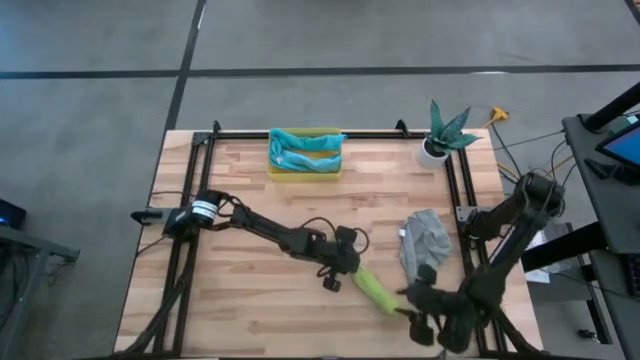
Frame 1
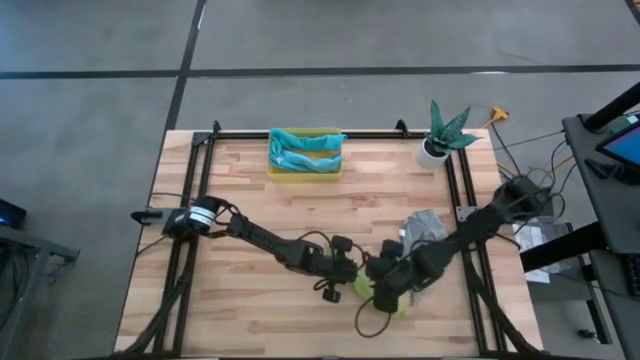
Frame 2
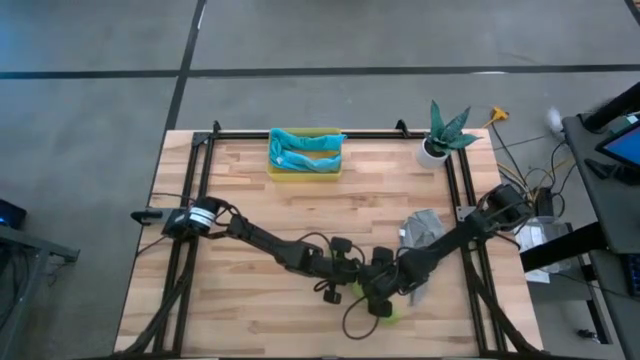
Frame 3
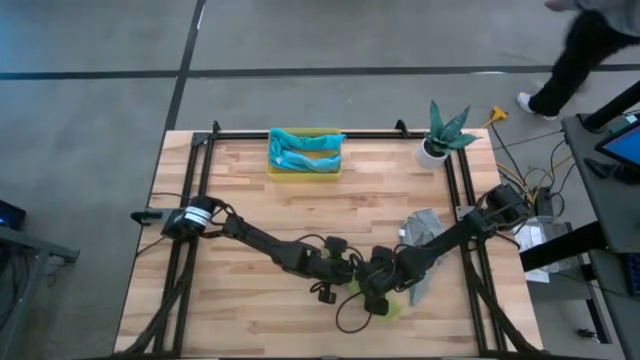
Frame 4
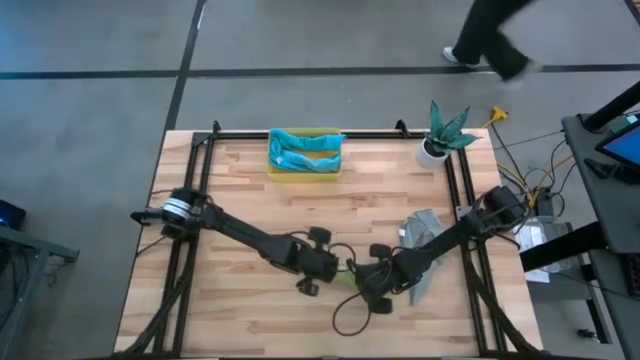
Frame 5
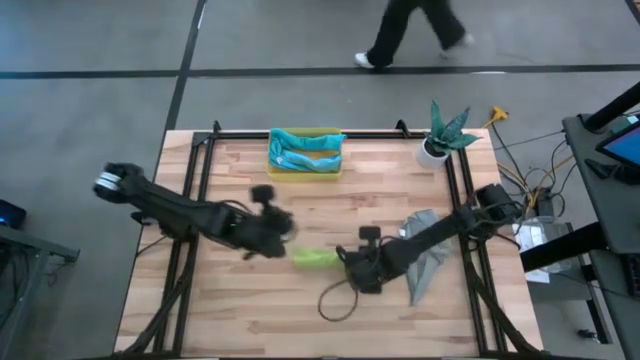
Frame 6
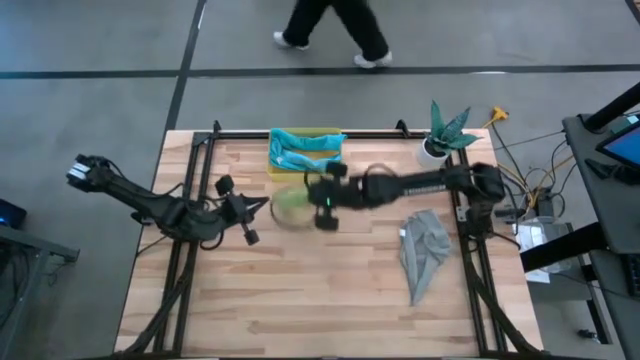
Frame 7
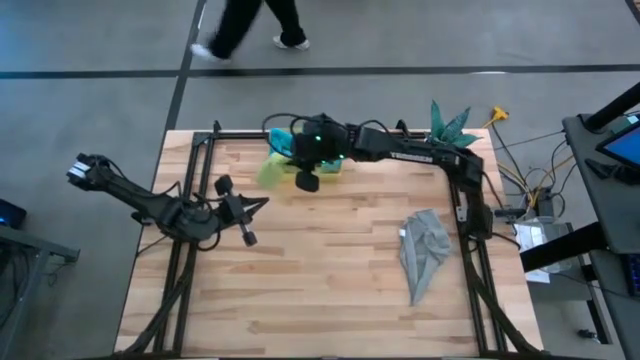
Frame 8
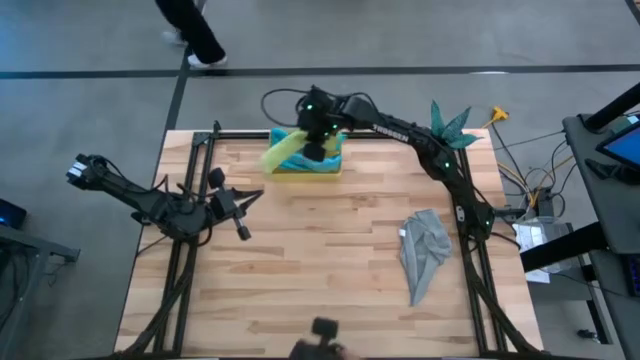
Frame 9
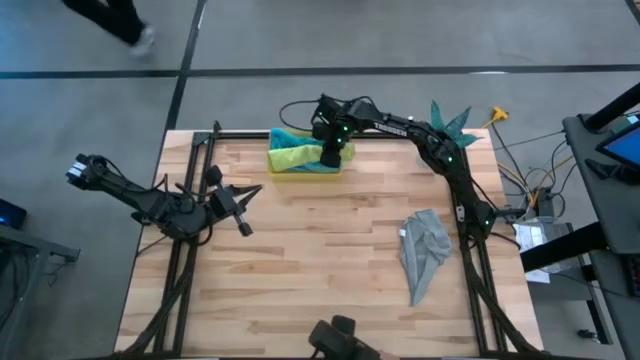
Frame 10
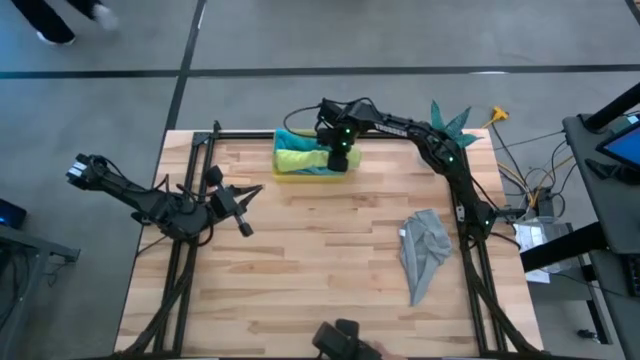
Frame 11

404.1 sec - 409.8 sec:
Task: Roll microfiber towels into tight, uniform cylinder then place into a basket
Put the rolled green towel into the yellow bin

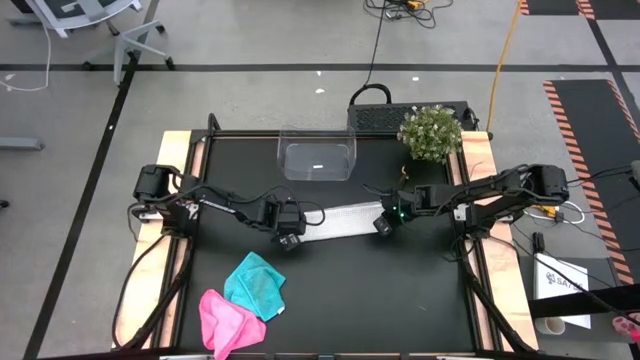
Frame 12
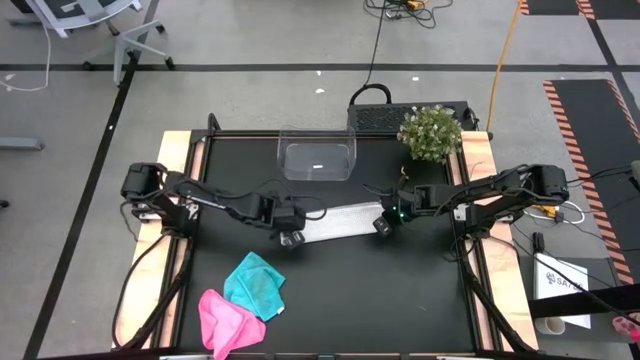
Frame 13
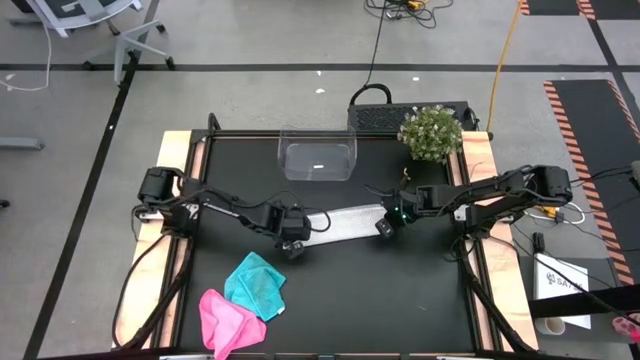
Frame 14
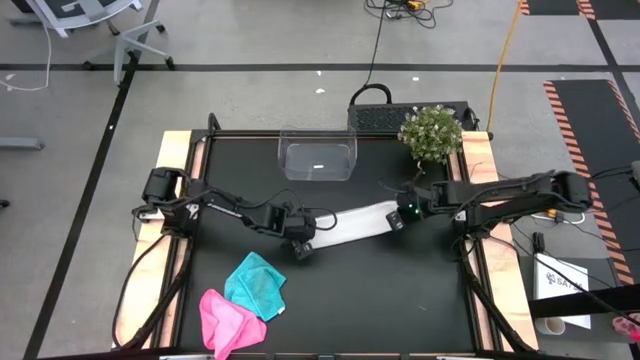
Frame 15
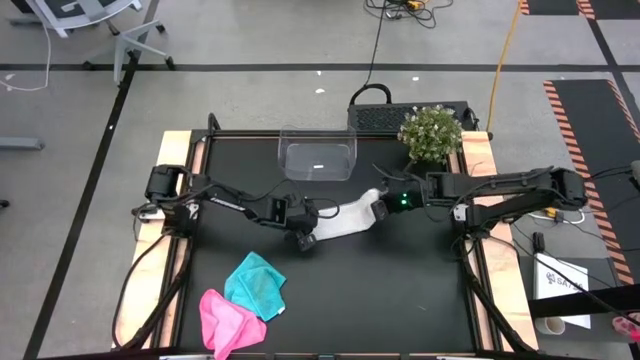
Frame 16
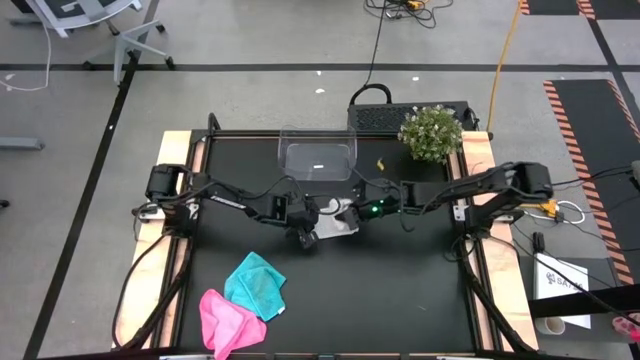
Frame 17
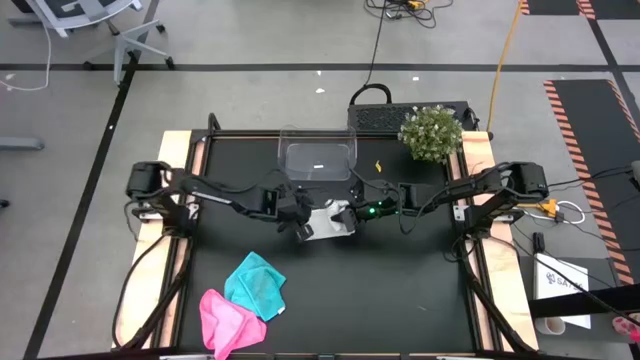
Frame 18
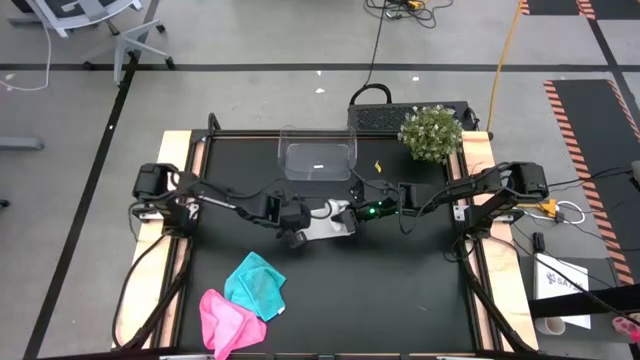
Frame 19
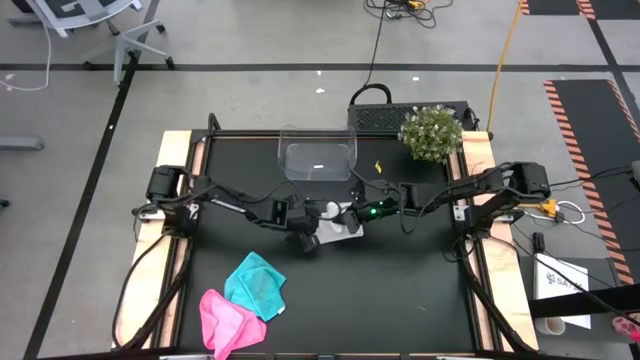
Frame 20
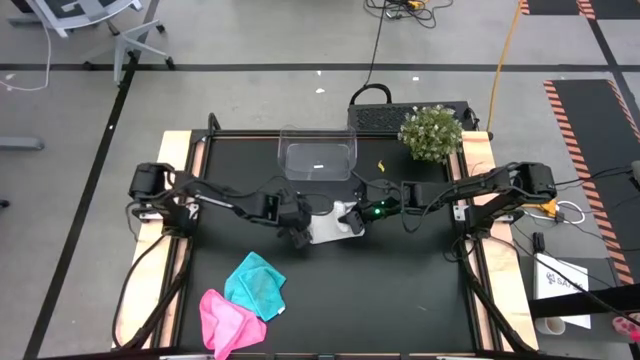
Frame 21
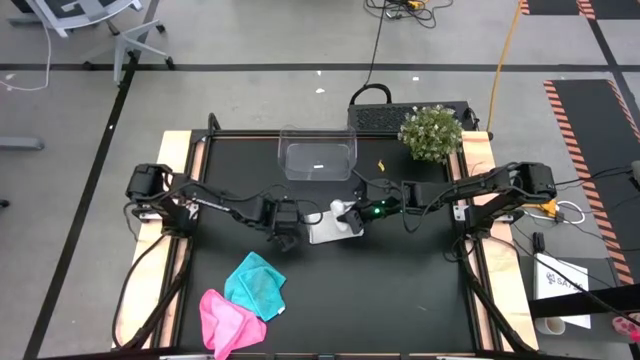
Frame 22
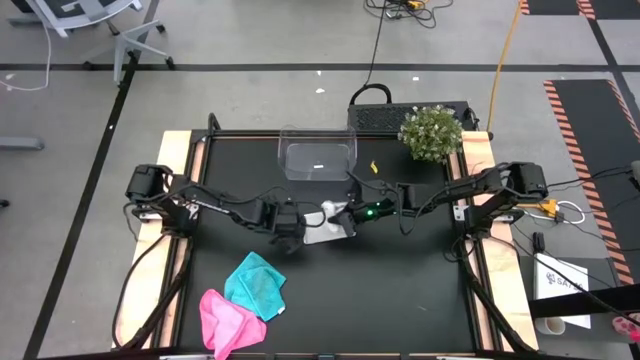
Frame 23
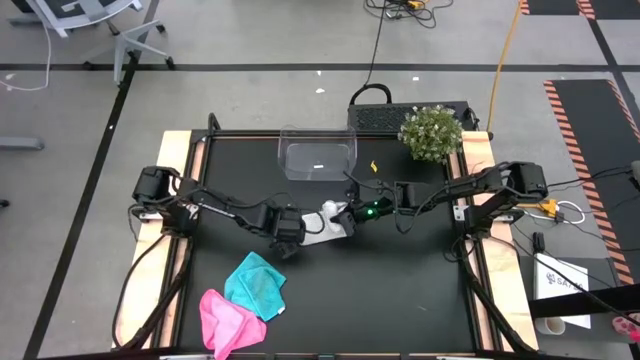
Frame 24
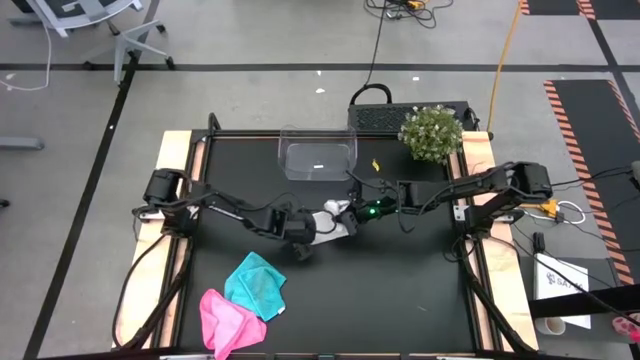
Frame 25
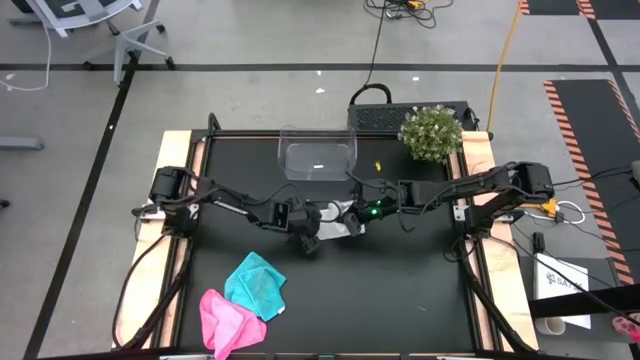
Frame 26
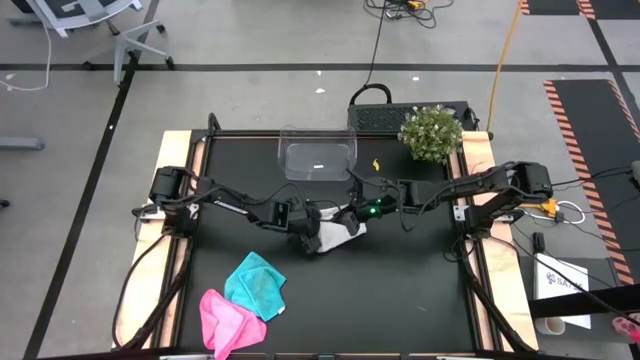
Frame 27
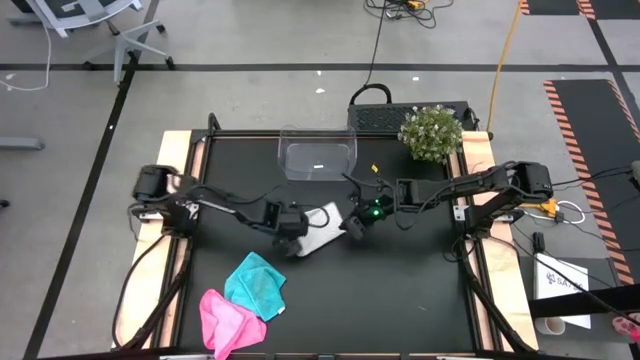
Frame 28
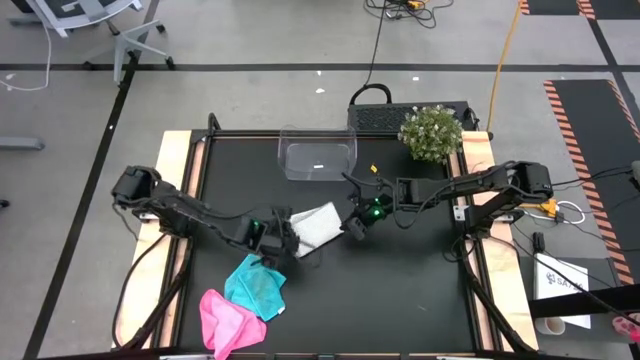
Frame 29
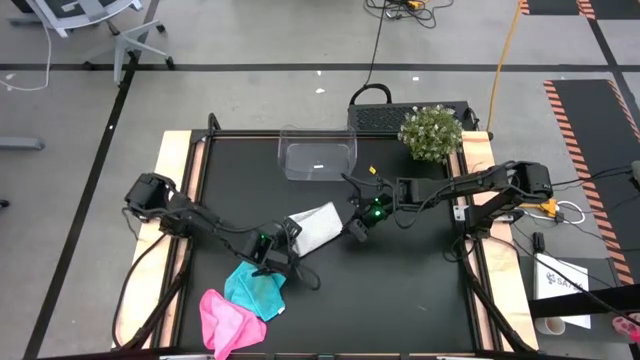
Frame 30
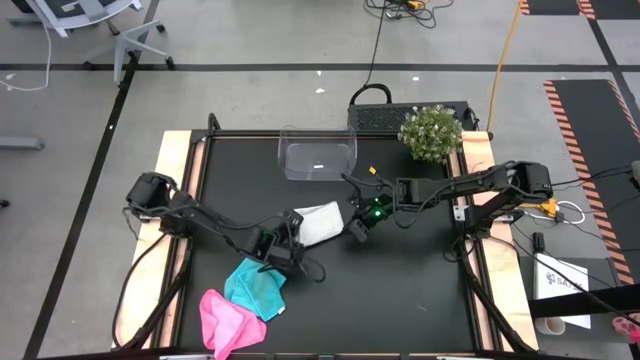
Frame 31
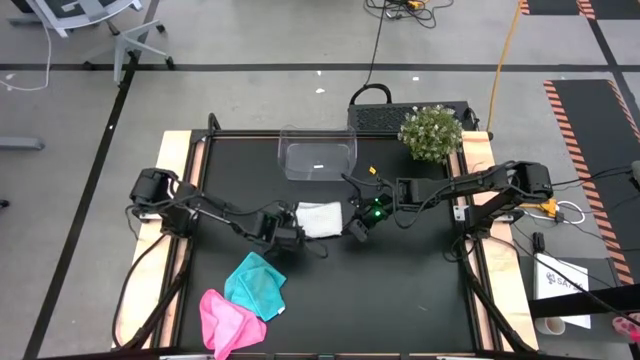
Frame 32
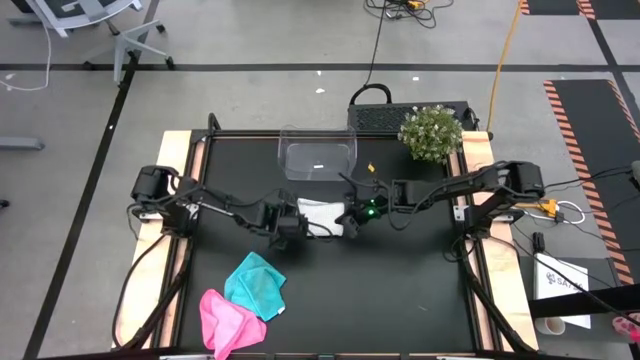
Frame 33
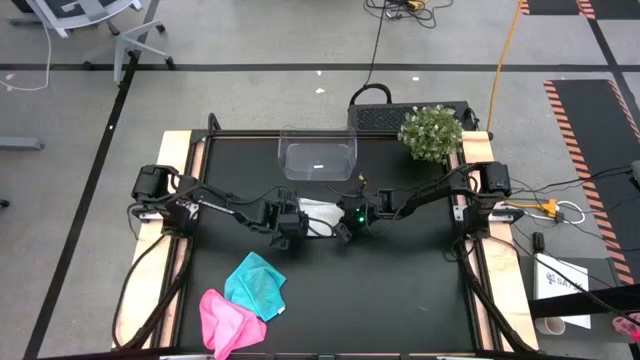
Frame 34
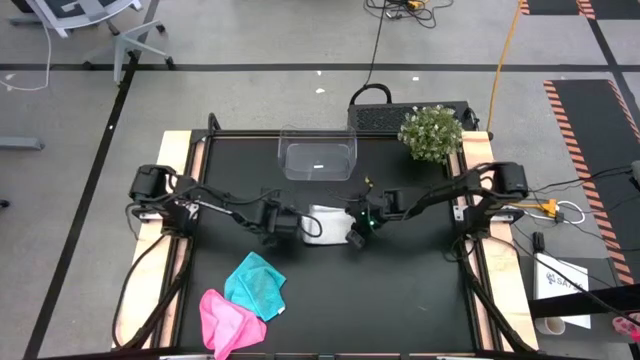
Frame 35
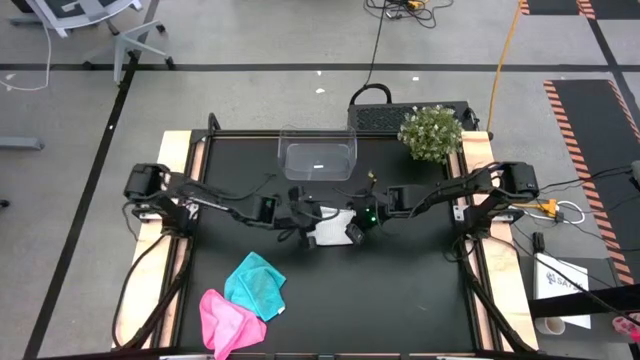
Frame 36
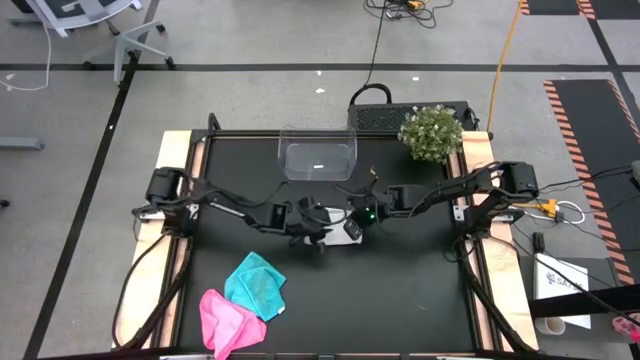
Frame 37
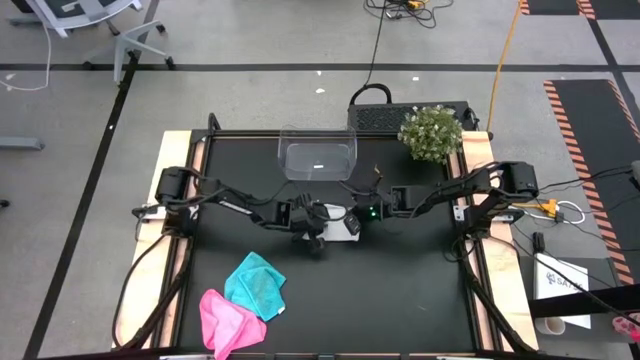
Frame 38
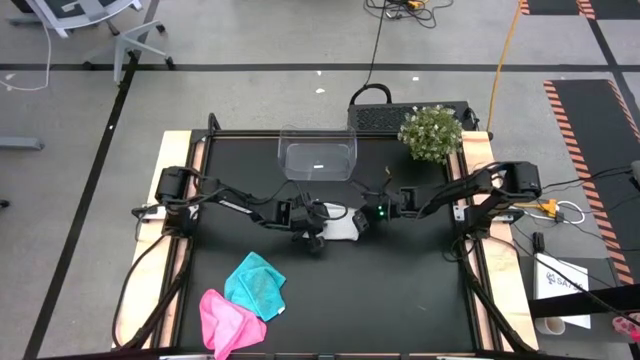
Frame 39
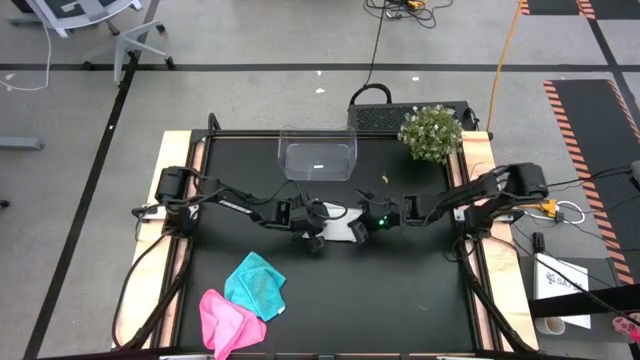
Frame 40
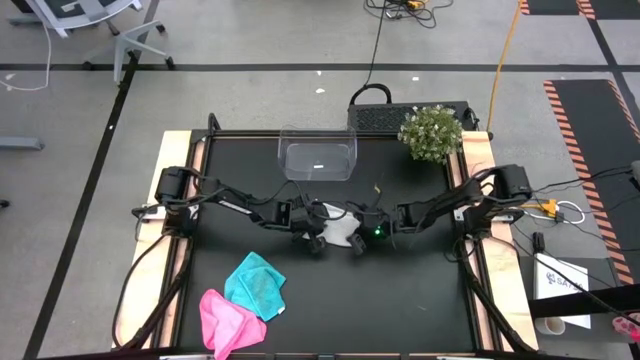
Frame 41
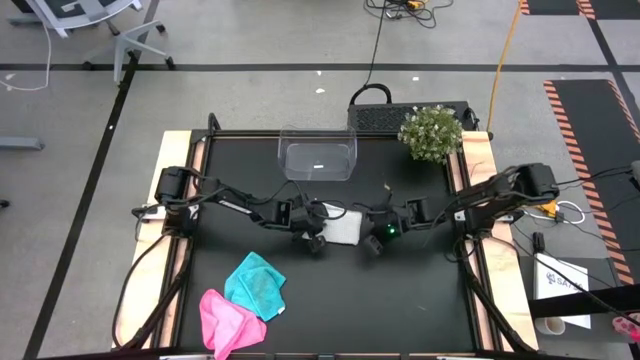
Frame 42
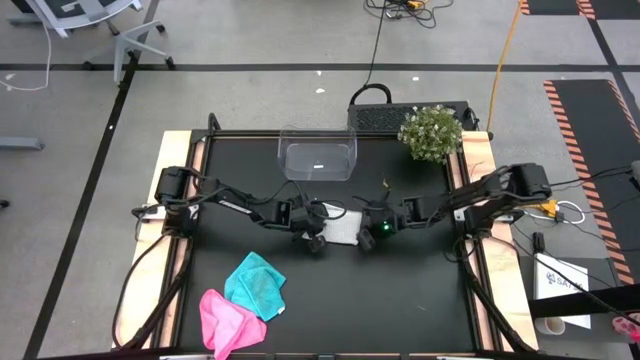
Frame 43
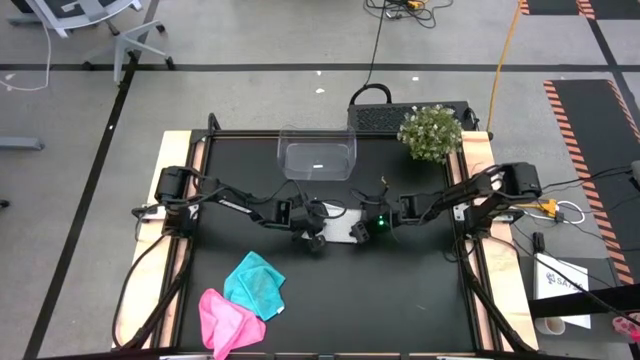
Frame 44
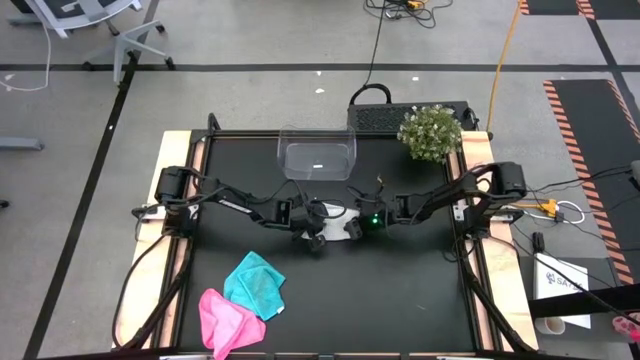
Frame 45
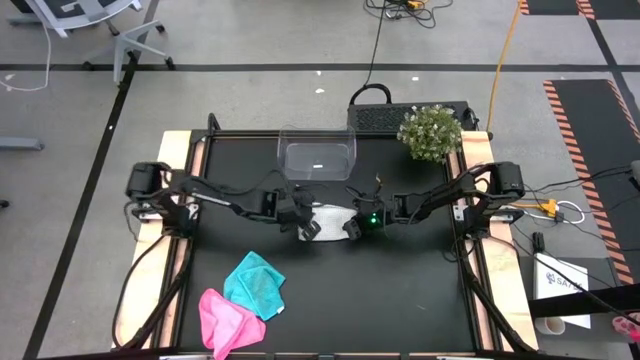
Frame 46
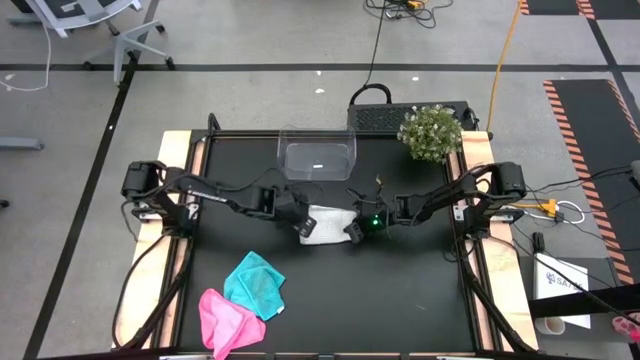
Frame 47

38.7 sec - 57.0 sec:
Task: Fold microfiber towels
Fold the white microfiber towel
